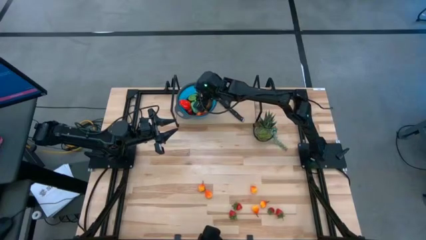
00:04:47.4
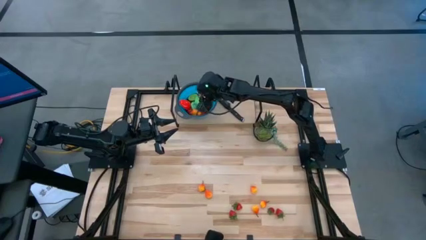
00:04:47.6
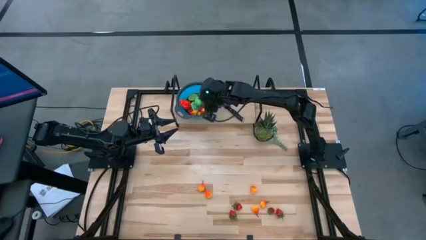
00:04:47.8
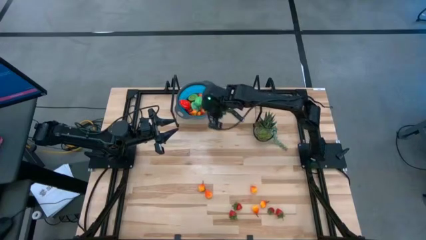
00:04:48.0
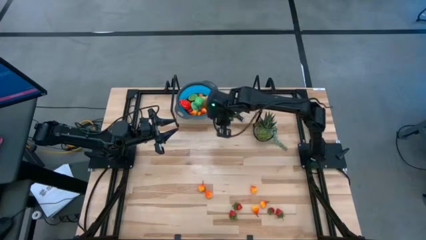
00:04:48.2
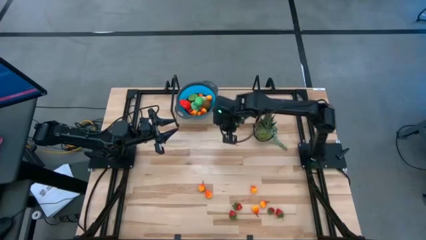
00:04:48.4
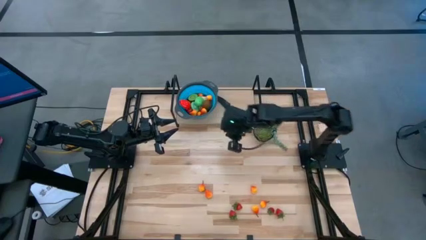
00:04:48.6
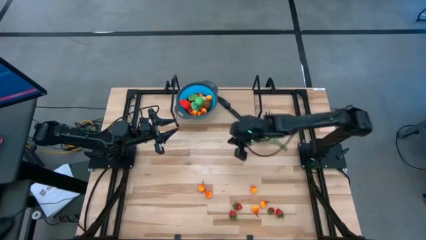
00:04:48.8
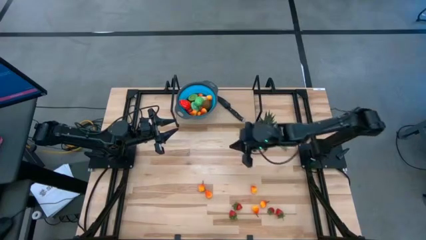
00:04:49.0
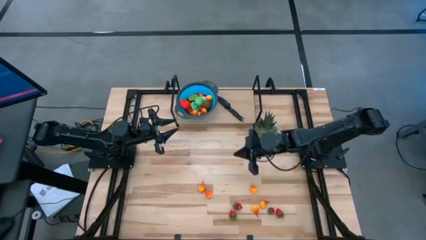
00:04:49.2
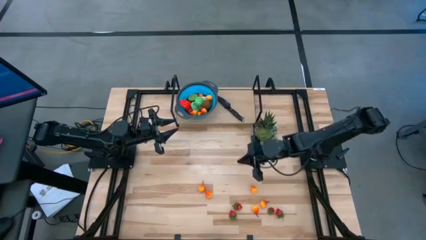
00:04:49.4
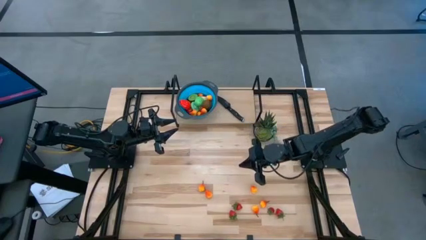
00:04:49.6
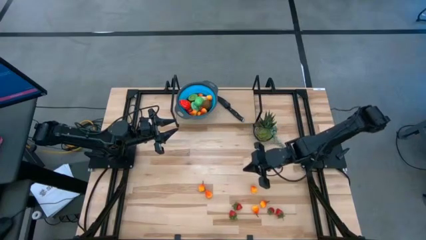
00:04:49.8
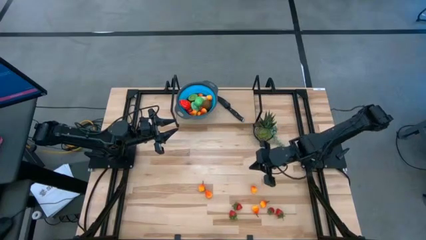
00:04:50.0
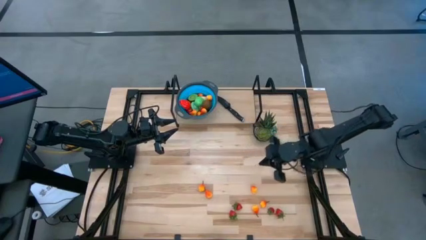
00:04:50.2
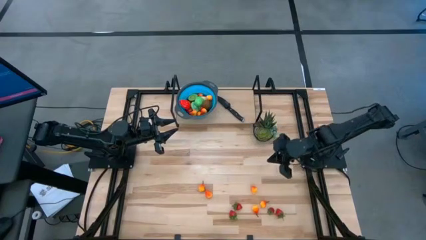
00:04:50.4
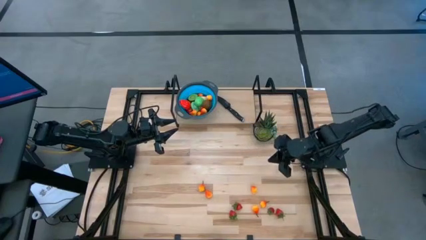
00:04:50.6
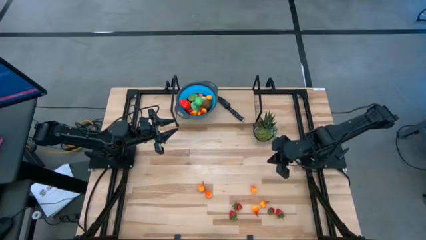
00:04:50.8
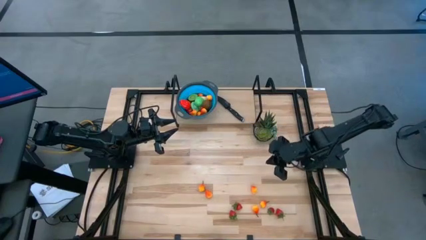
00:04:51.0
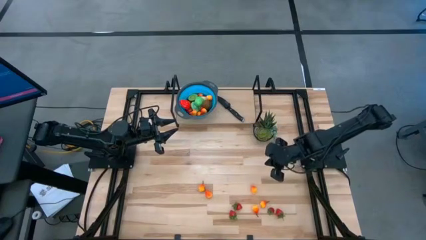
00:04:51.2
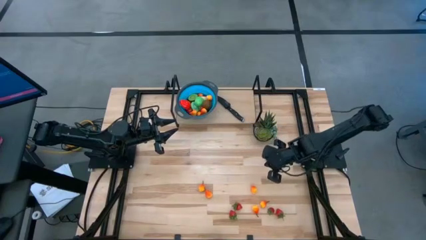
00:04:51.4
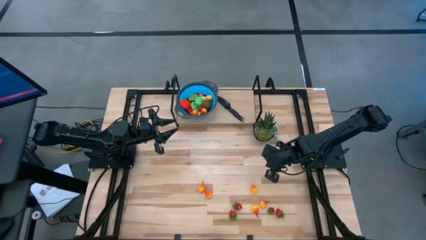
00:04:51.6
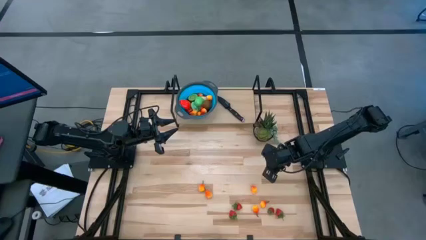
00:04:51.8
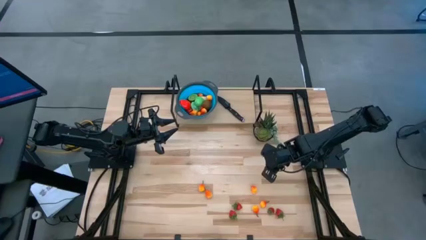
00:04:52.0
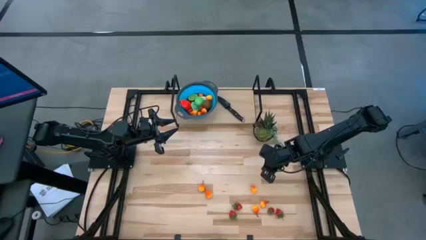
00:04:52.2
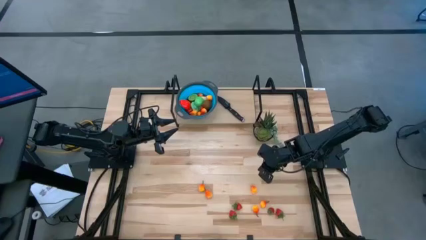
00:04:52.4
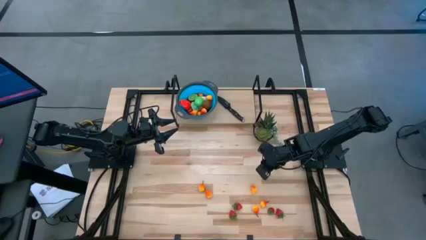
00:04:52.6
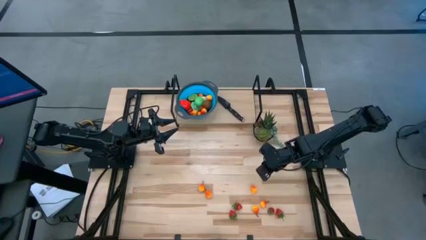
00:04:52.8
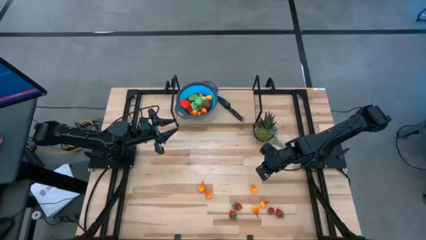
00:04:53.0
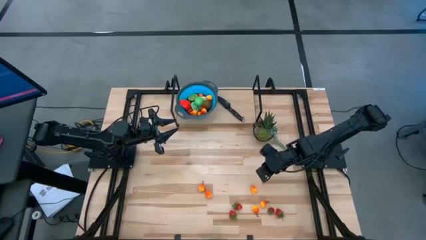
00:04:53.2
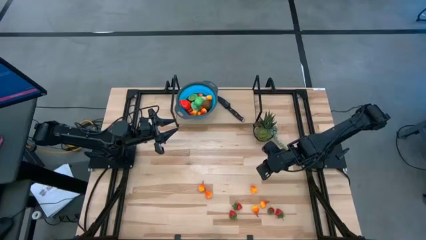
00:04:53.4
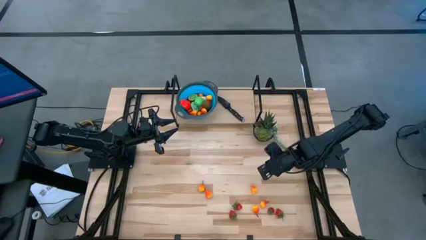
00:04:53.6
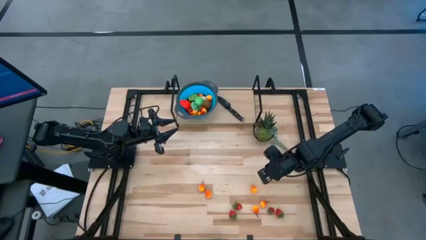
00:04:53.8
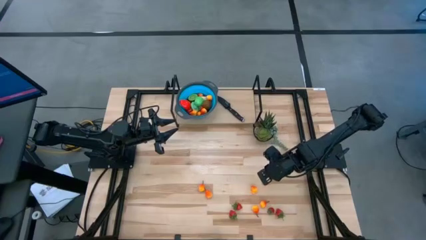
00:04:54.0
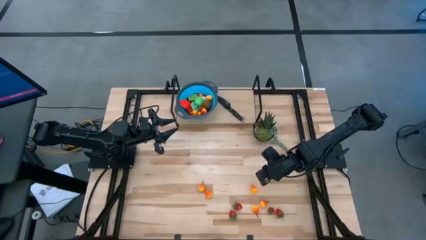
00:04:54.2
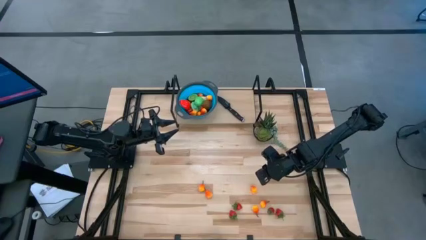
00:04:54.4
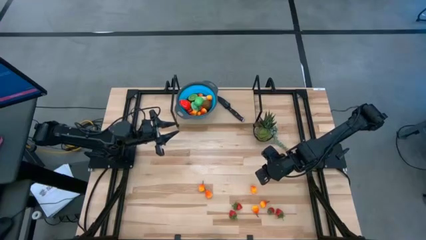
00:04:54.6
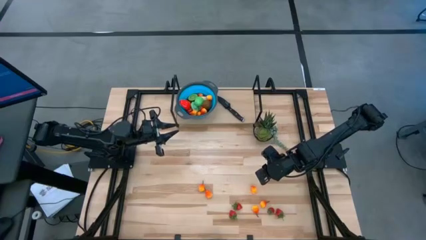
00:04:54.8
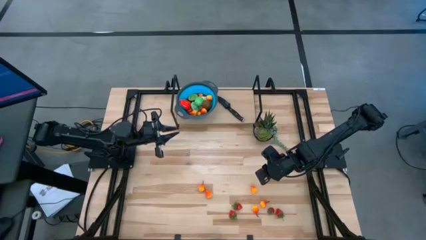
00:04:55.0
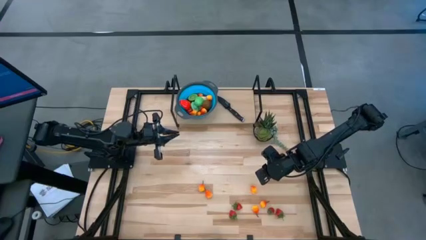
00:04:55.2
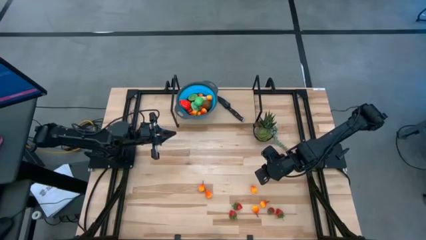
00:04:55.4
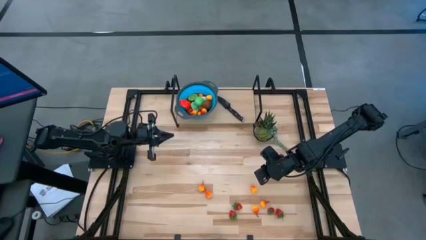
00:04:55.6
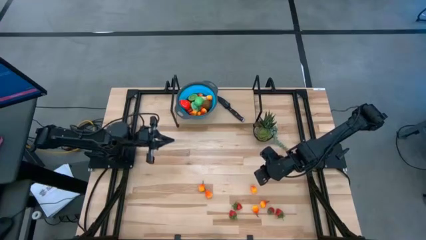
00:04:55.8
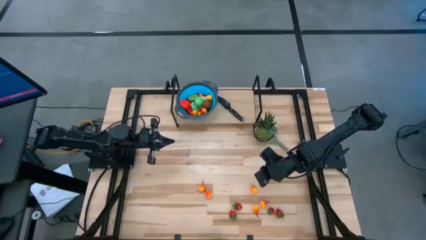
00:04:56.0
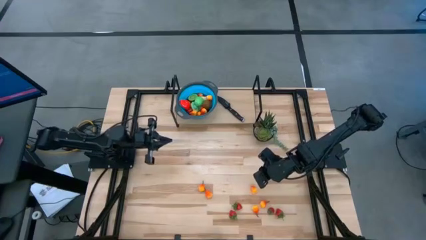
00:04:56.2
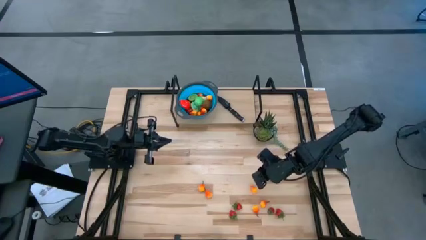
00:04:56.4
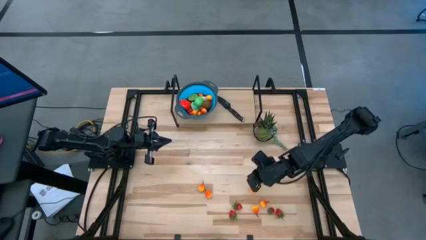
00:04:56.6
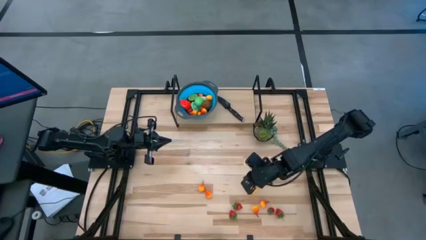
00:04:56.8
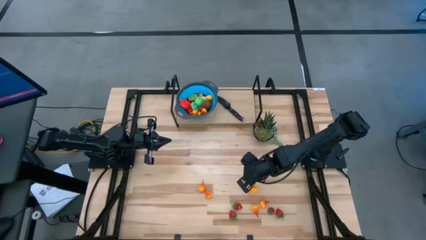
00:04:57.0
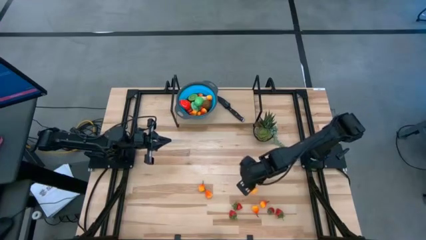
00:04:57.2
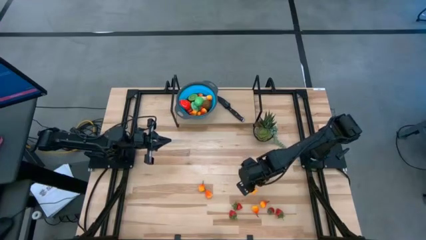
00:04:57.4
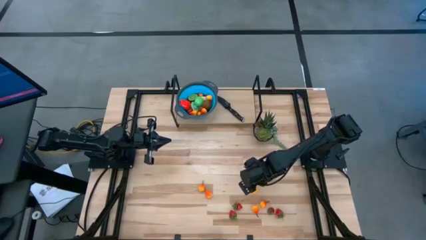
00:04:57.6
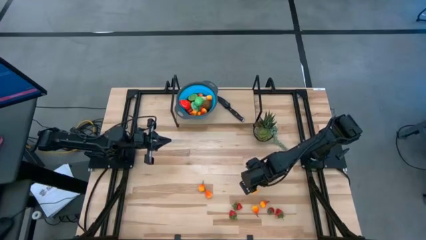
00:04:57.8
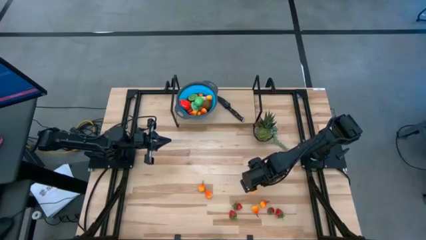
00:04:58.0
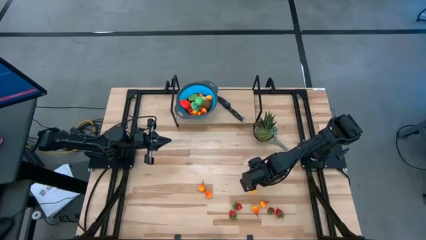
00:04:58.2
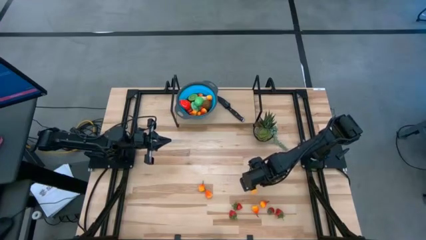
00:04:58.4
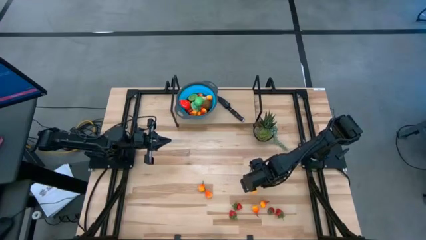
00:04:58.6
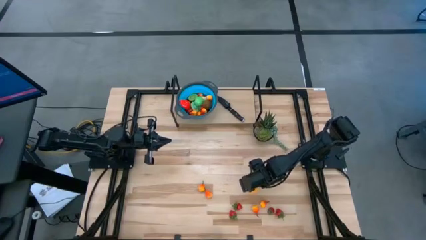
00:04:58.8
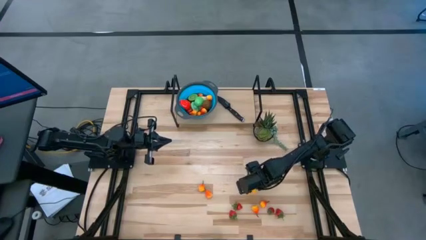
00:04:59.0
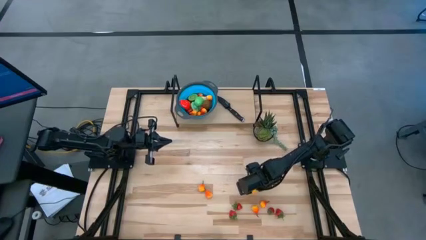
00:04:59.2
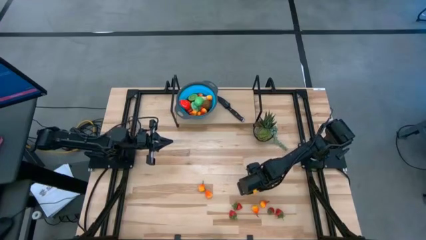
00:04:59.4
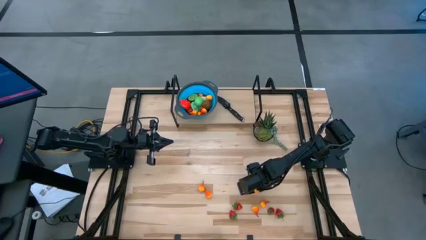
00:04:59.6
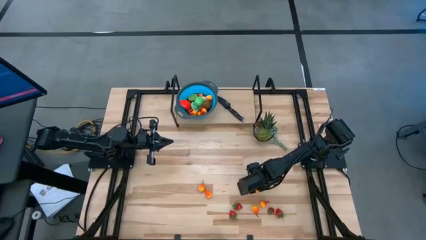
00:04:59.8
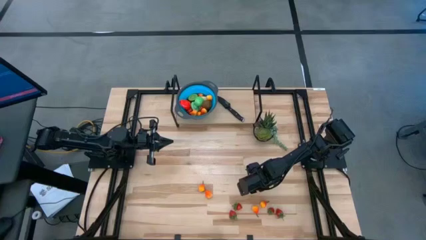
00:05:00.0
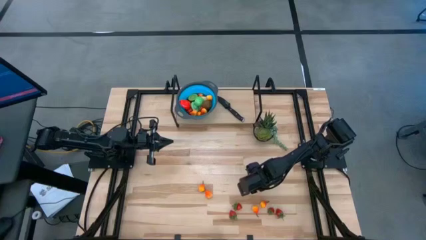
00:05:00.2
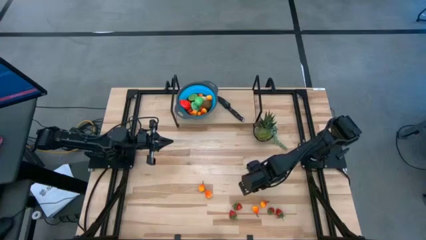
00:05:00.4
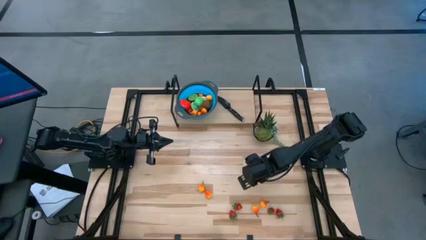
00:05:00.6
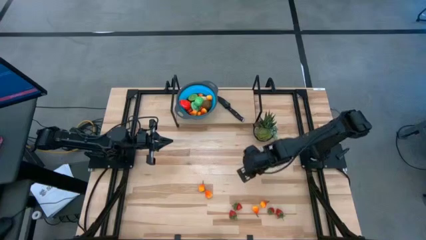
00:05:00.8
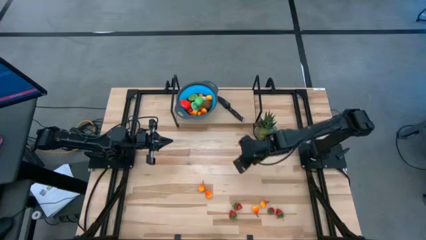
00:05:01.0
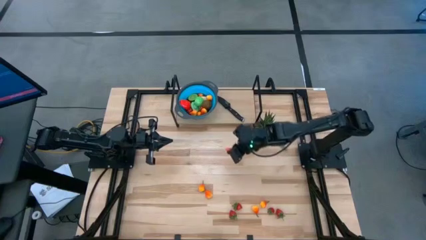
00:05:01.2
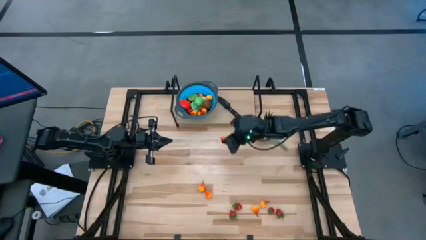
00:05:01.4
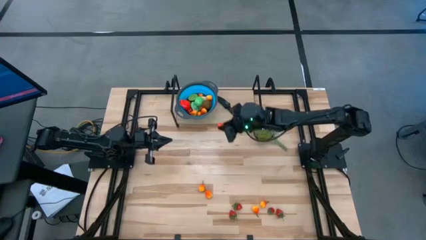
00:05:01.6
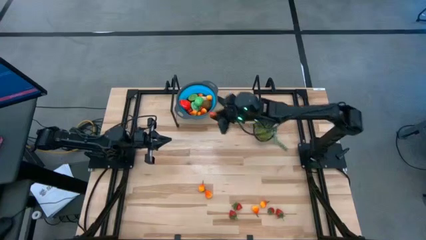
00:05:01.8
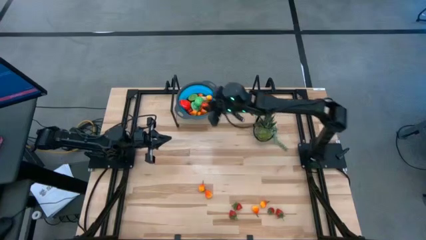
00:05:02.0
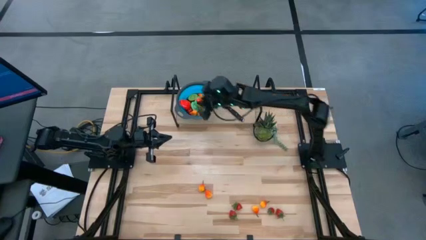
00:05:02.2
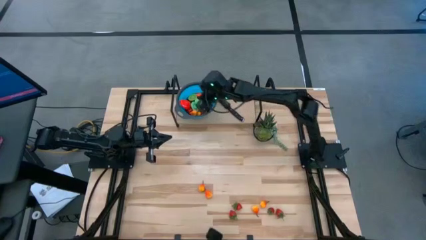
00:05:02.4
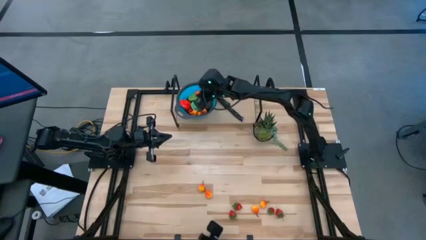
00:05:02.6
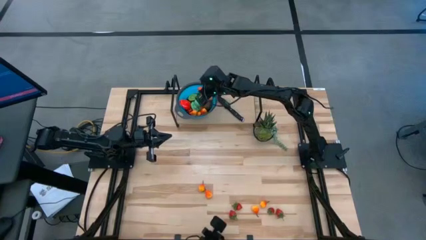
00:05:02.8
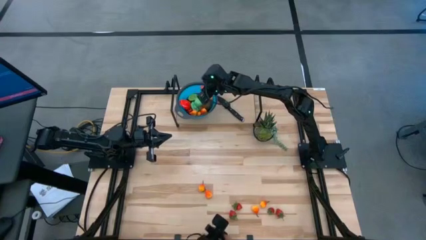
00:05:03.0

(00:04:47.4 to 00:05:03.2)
Task: Pick & Place Fruit
Put the pear into the basket
